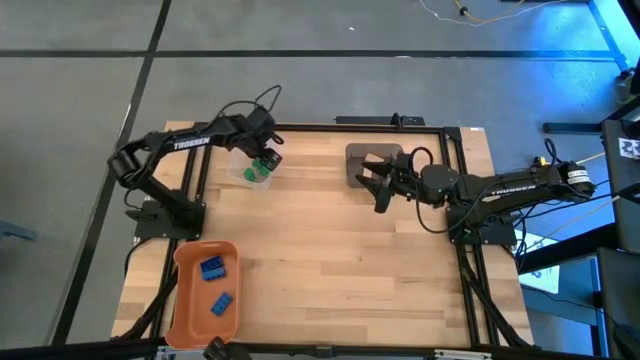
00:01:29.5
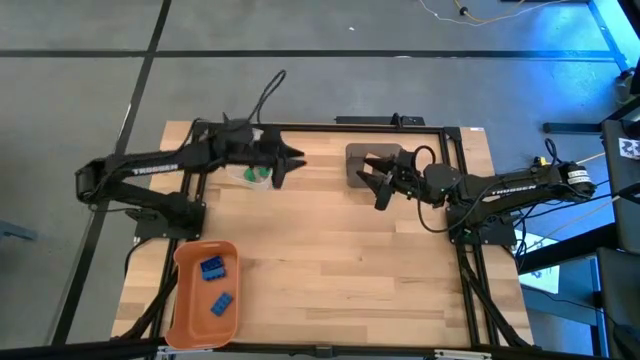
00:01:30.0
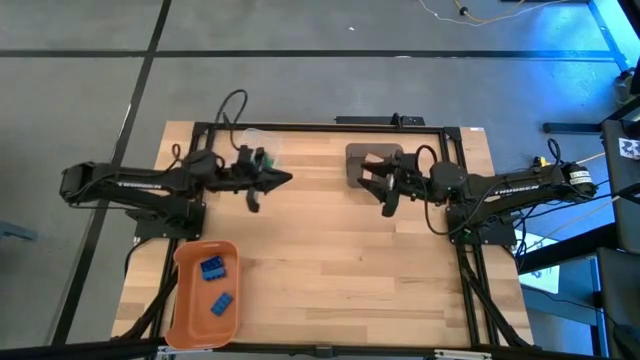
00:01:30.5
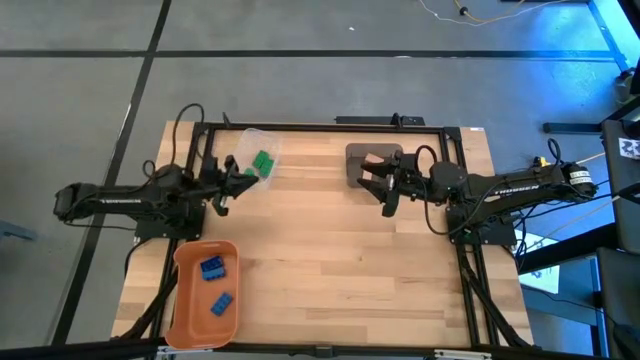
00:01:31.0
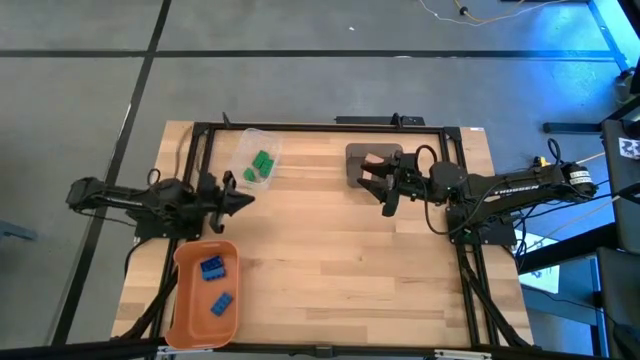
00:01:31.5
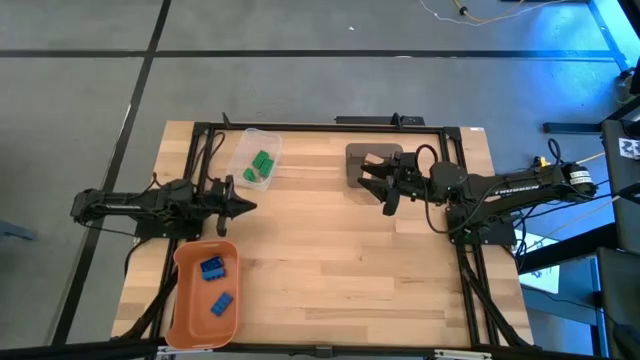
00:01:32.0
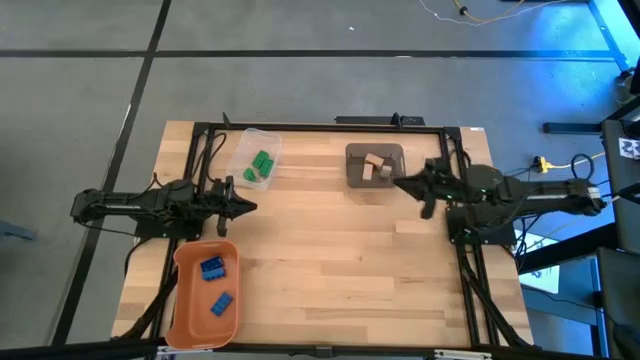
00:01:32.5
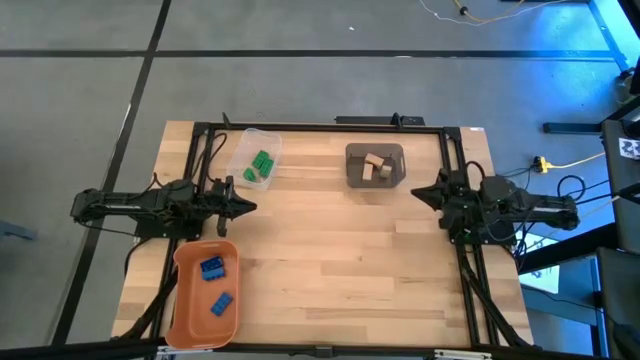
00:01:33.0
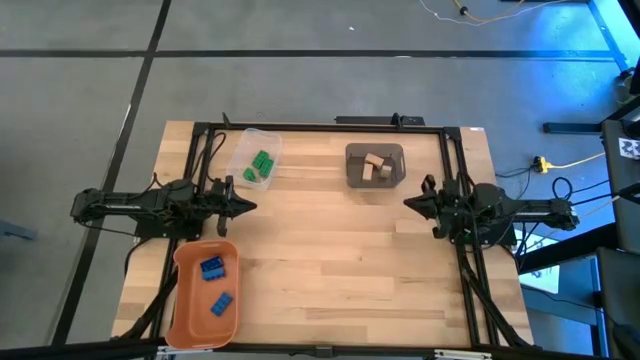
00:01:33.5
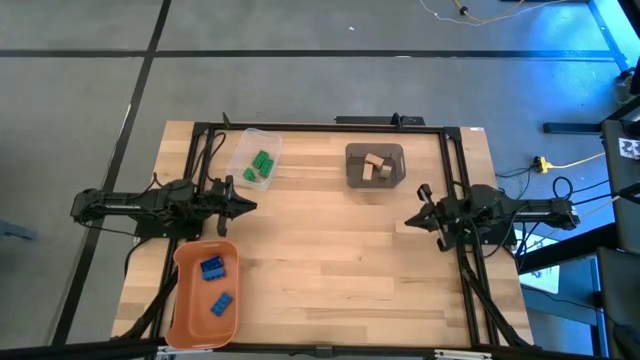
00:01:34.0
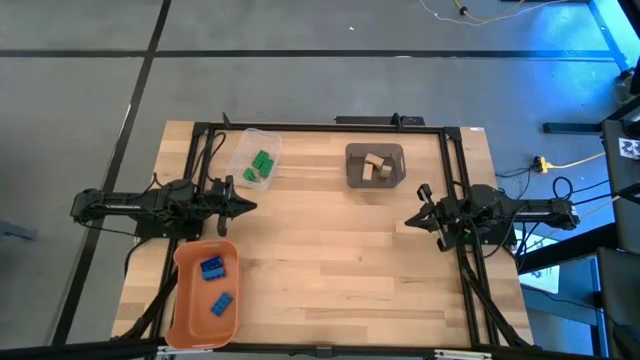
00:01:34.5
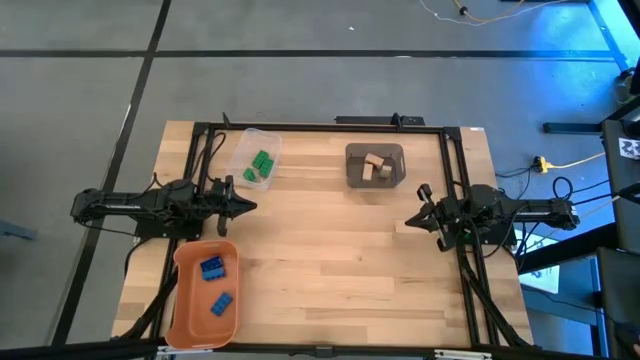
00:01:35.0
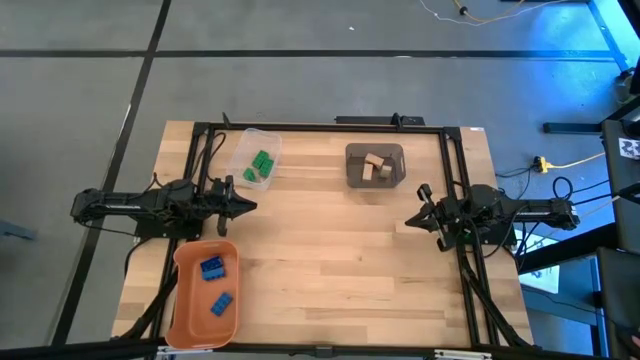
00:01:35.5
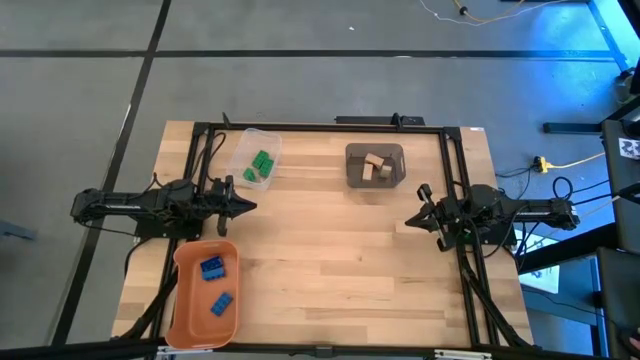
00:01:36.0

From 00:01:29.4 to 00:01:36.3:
Task: Sort & place blocks by color
Return to Home Position

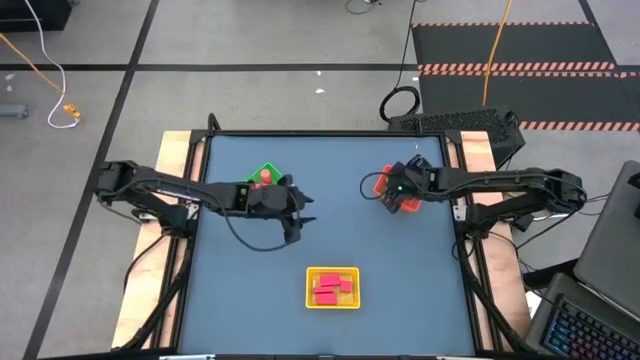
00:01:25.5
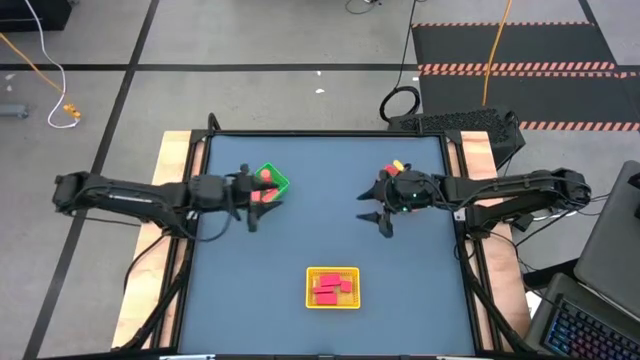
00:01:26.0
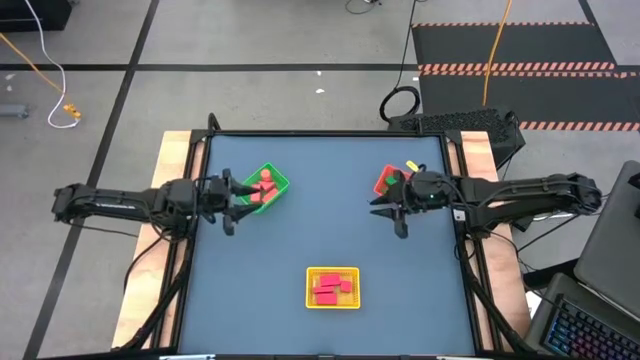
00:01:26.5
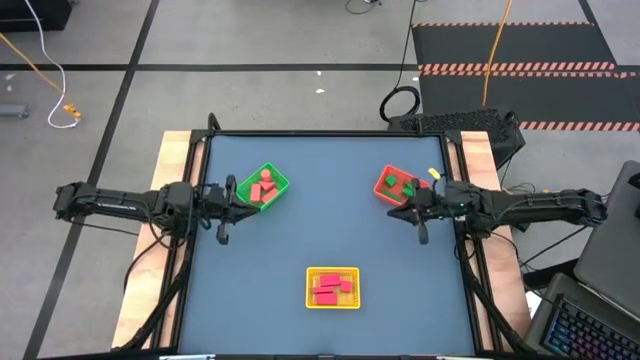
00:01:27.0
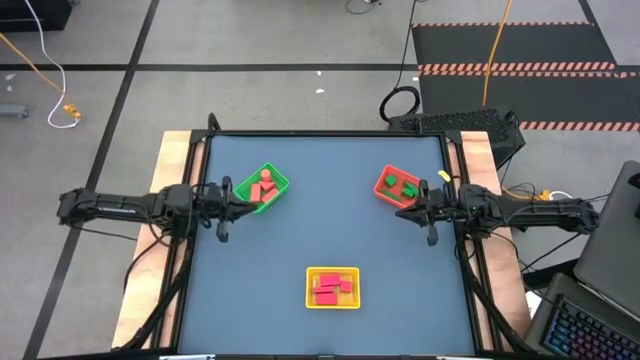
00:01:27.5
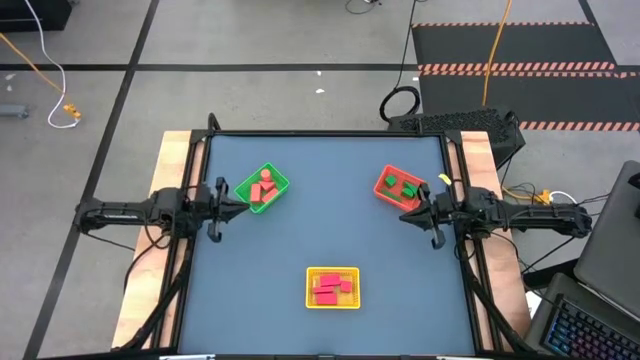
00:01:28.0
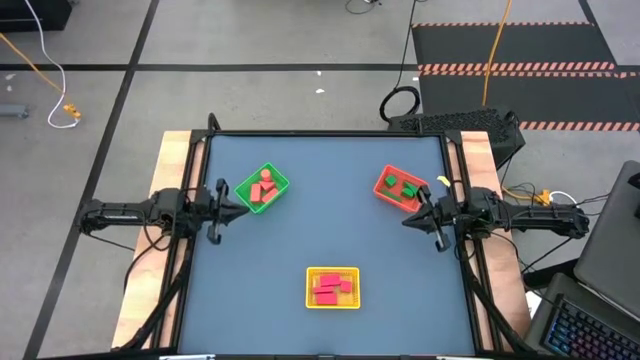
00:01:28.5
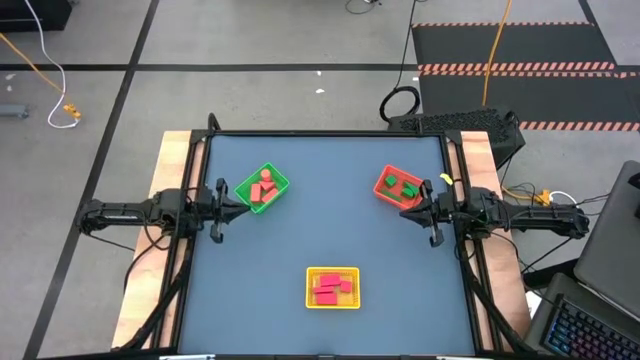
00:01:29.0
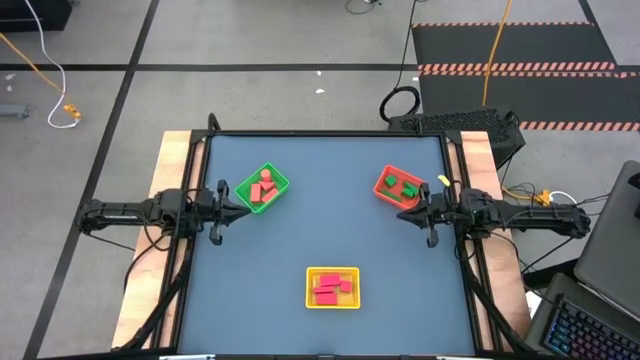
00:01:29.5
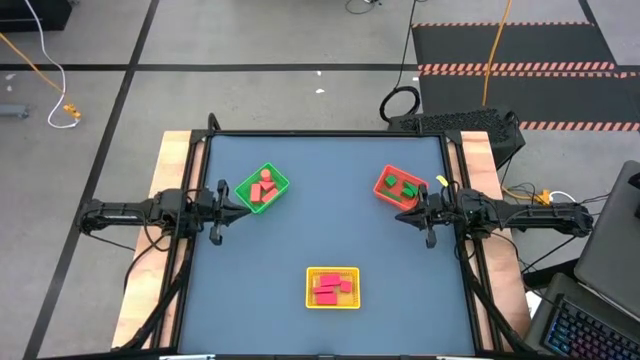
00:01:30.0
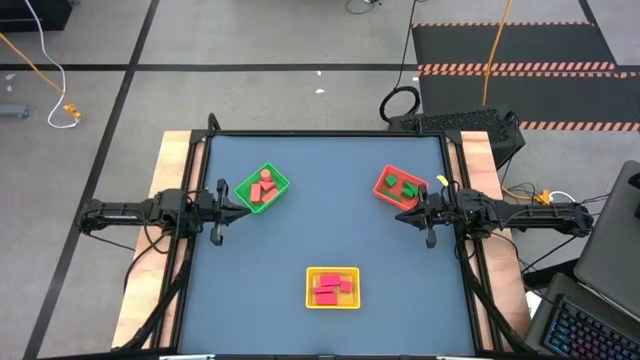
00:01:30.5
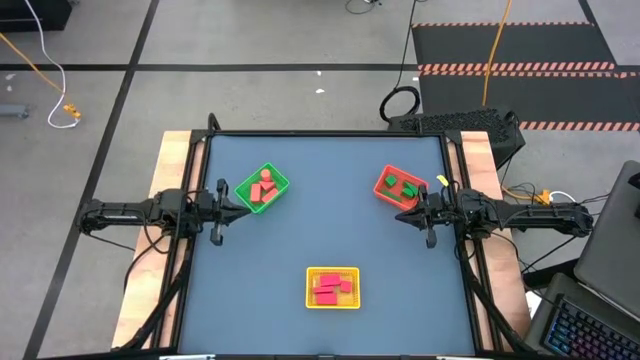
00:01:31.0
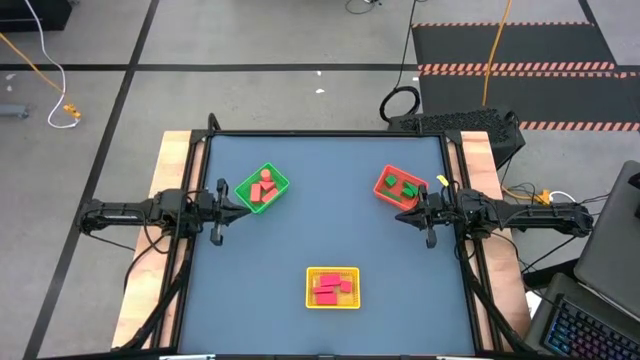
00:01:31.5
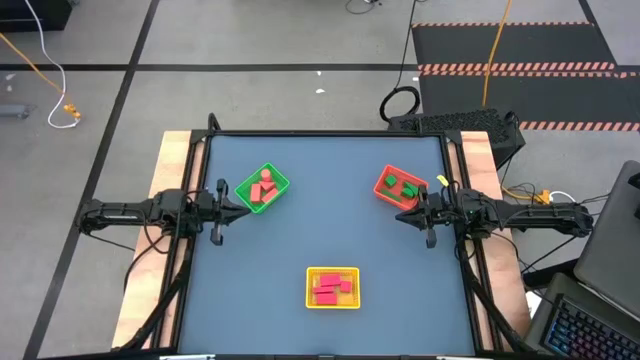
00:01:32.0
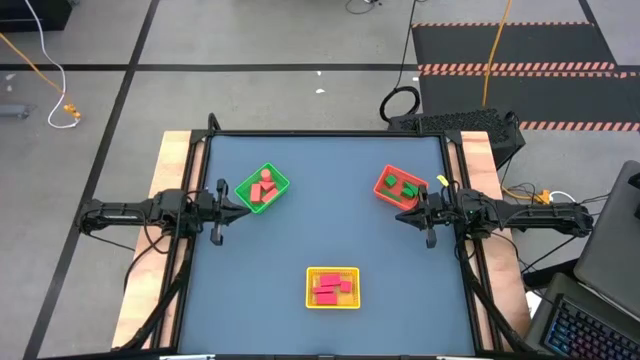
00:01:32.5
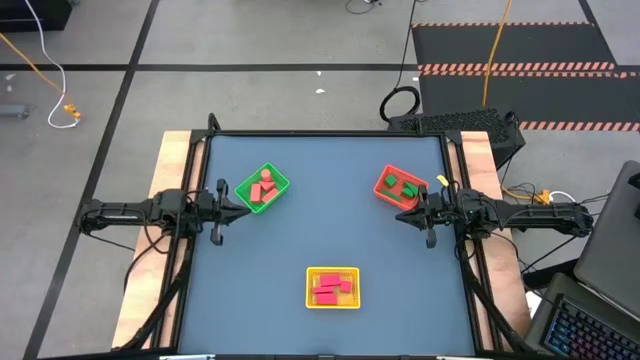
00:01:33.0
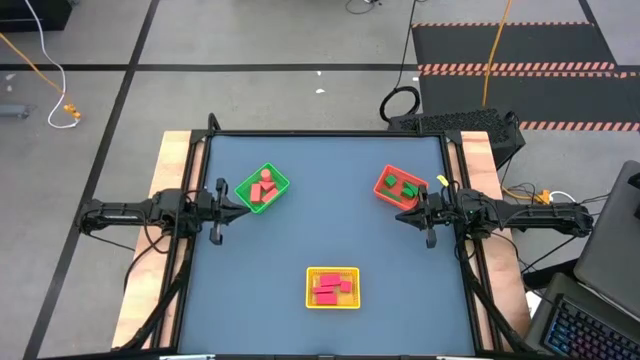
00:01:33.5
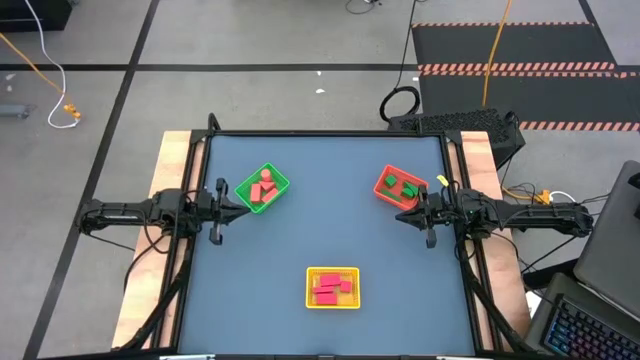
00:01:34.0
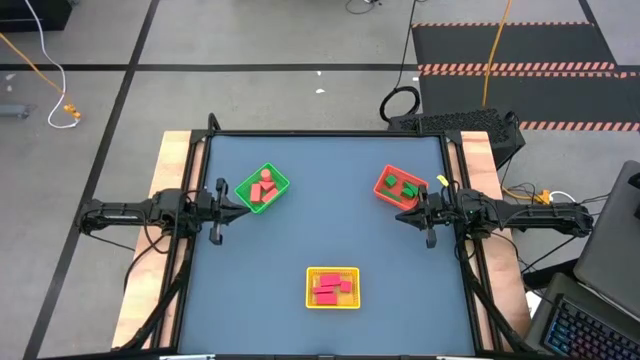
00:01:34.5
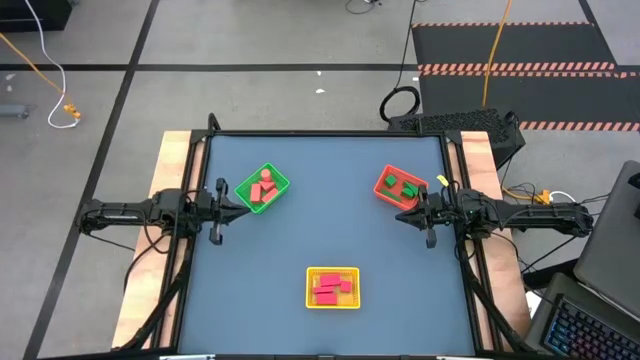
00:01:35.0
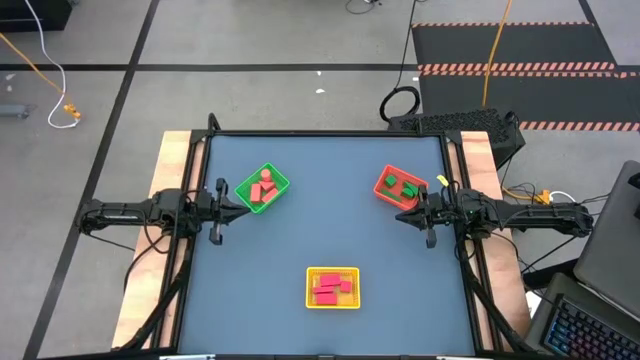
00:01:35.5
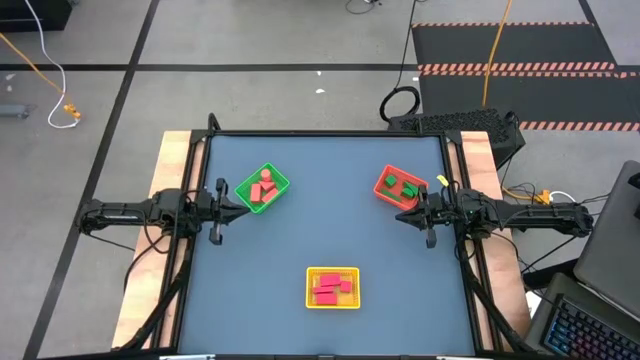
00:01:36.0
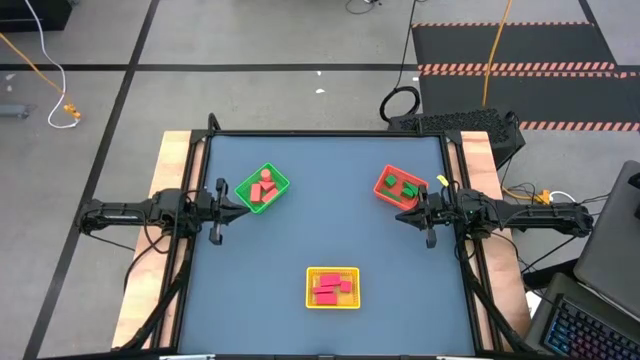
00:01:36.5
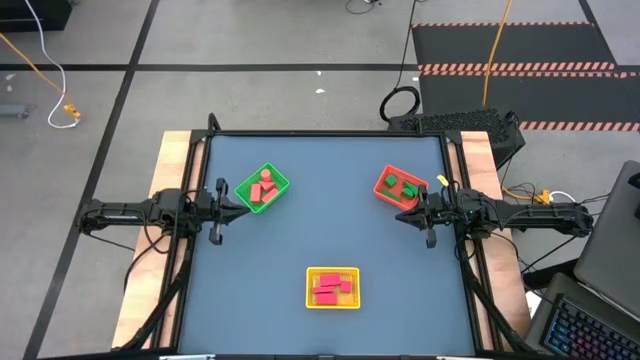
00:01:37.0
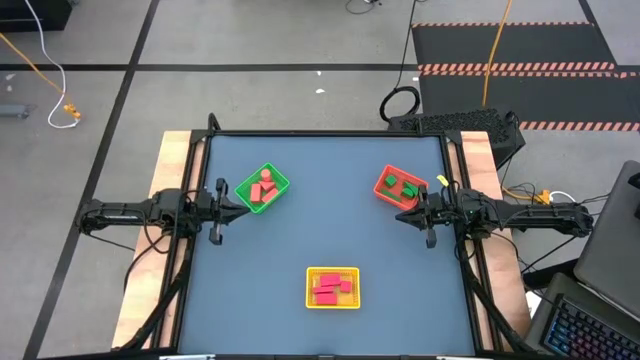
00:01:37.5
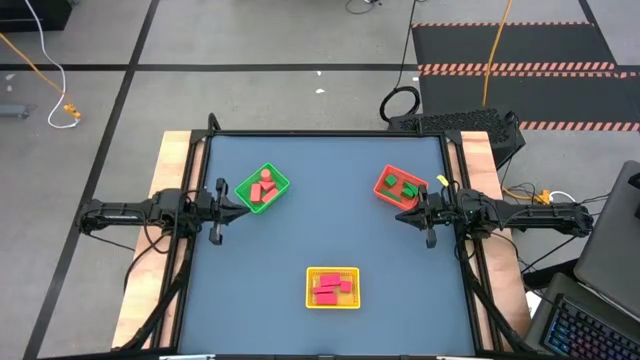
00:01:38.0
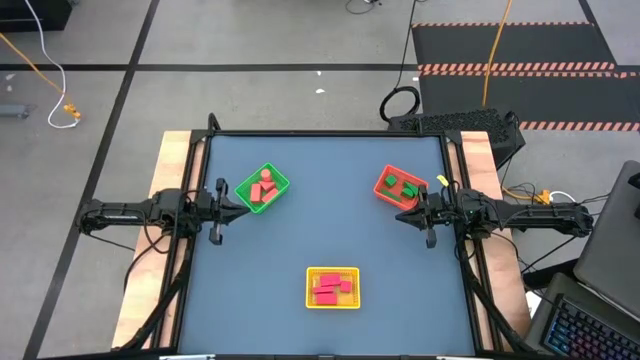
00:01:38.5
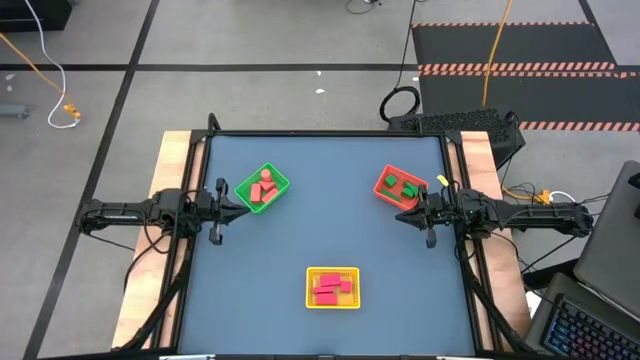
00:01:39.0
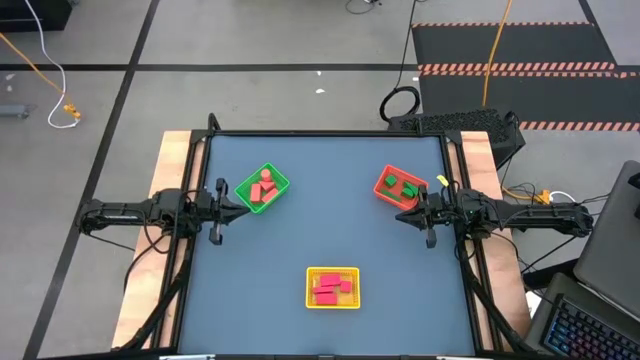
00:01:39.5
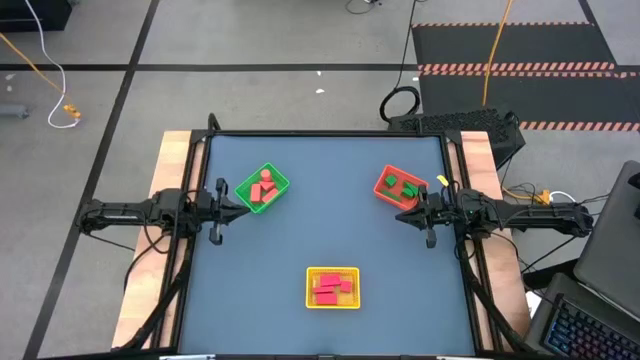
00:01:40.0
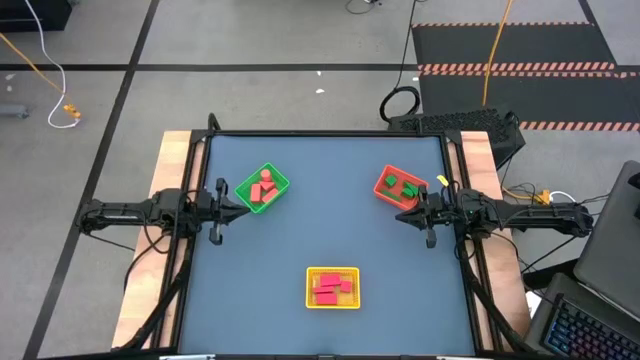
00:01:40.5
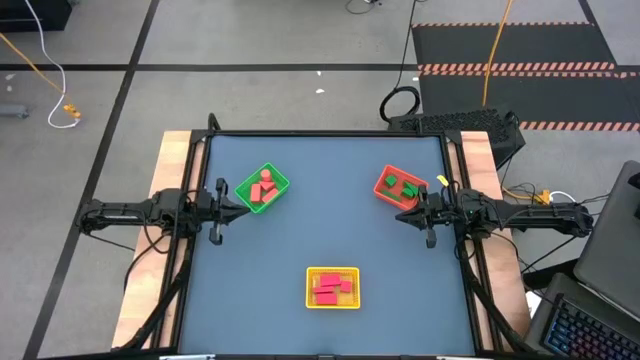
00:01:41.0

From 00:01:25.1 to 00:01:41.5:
Task: Sort & place blocks by color
Return to Home Position
